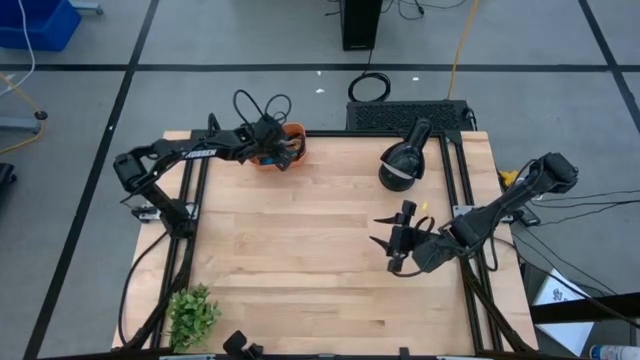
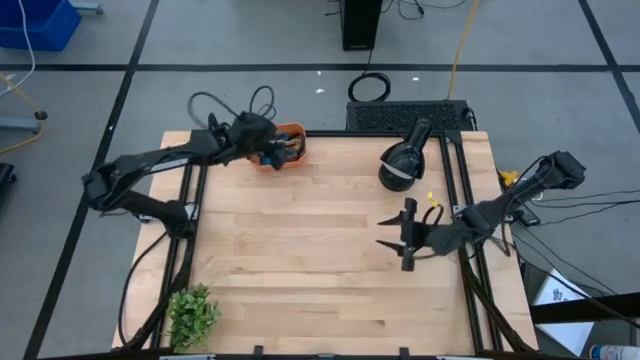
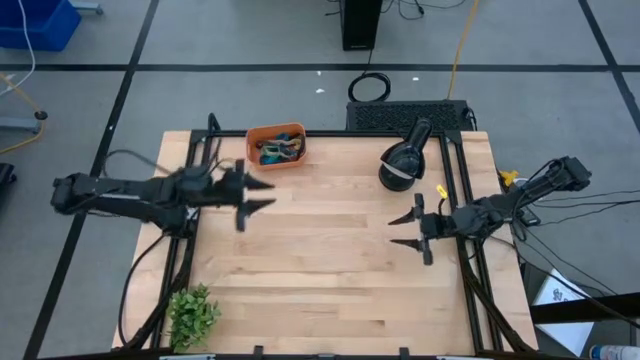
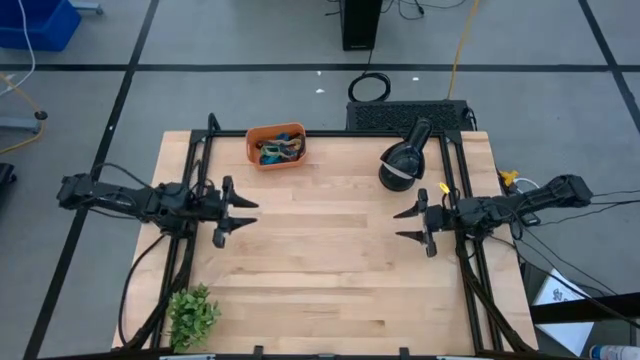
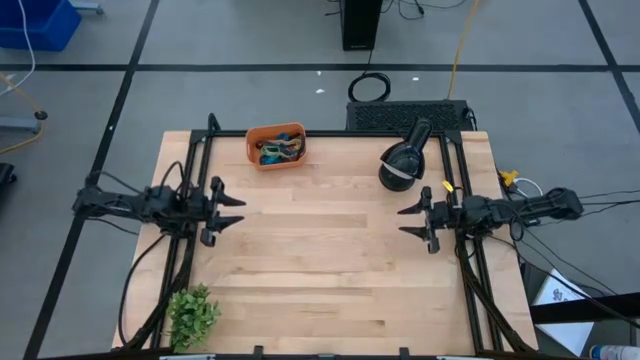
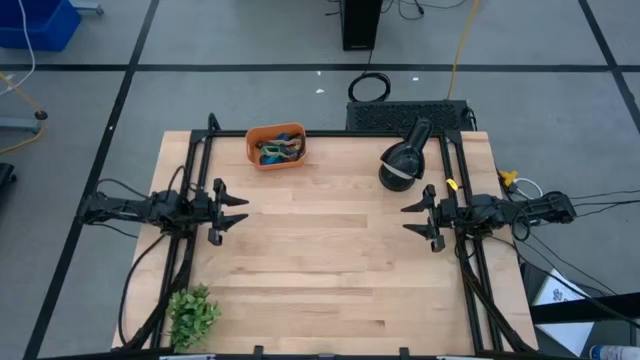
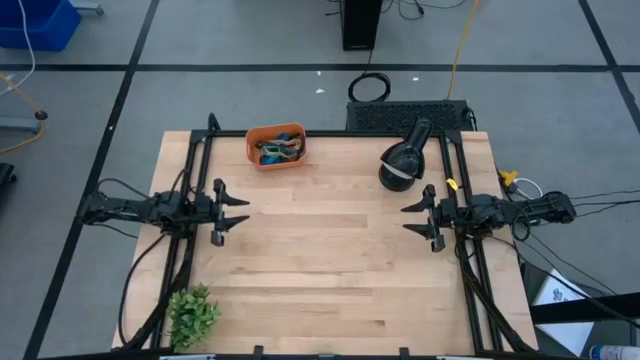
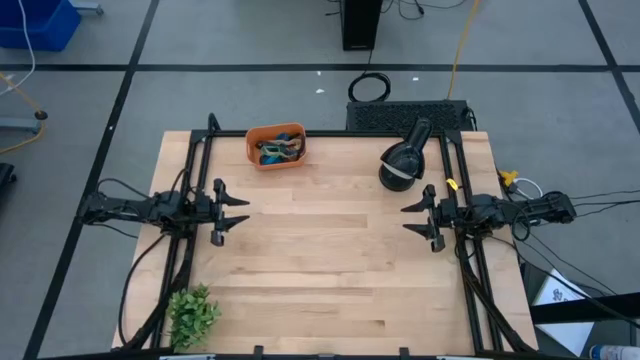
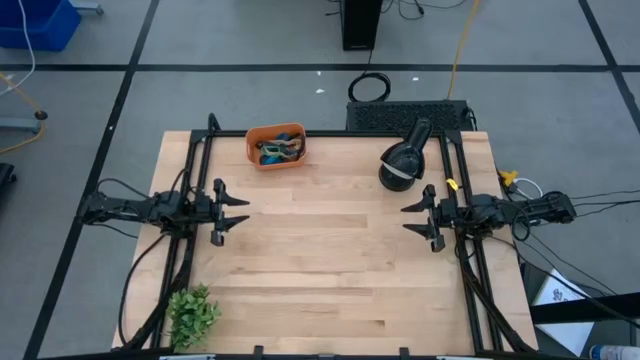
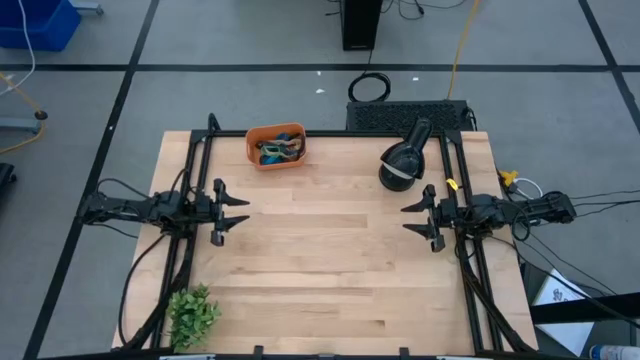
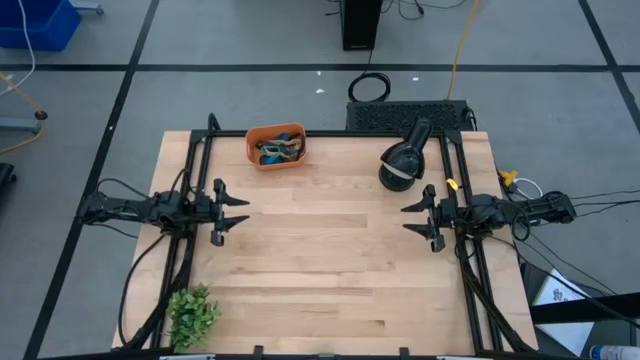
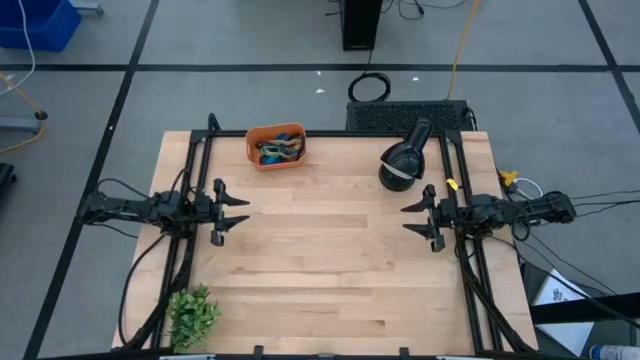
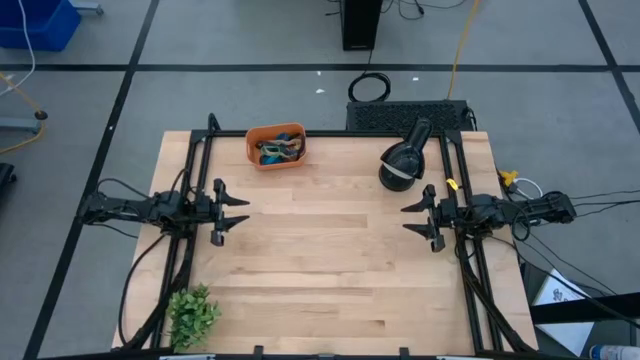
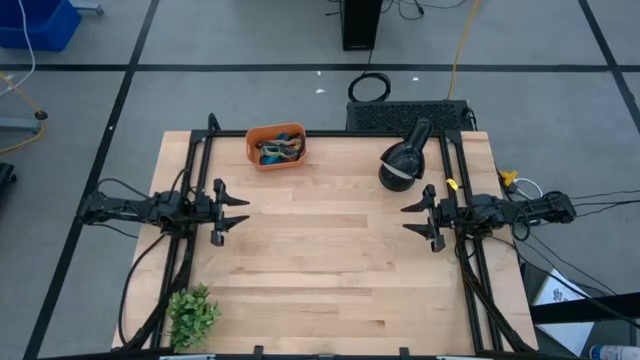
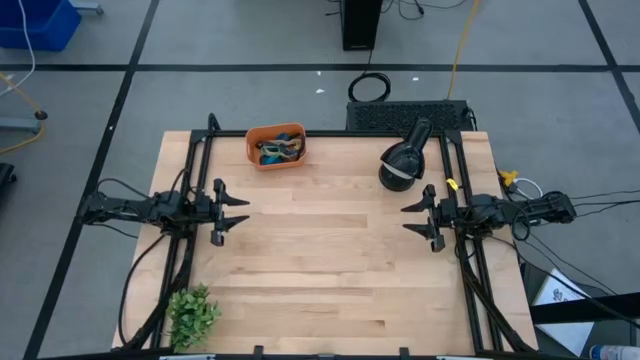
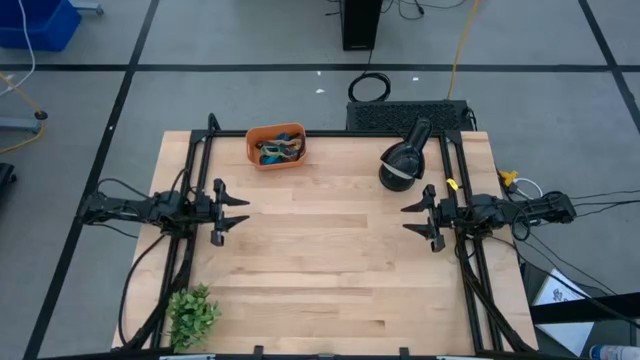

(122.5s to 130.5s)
Task: Pick and place rubber bands into bin
Return to Home Position

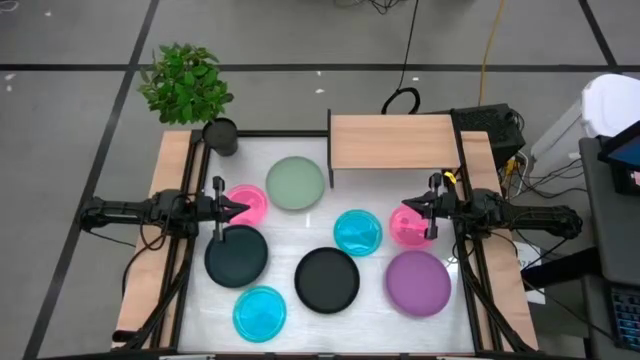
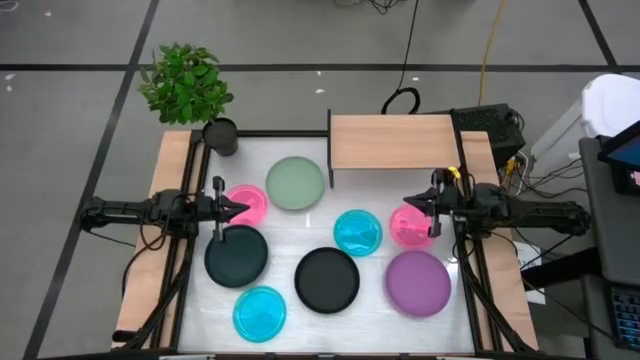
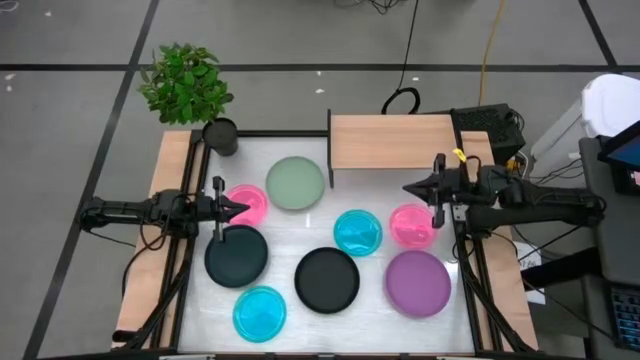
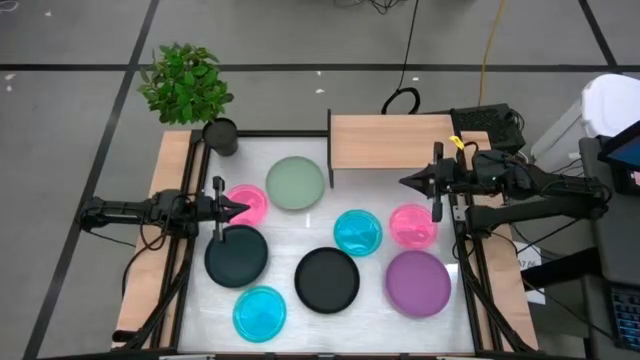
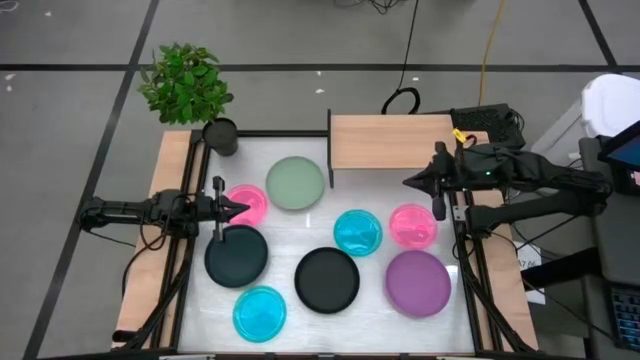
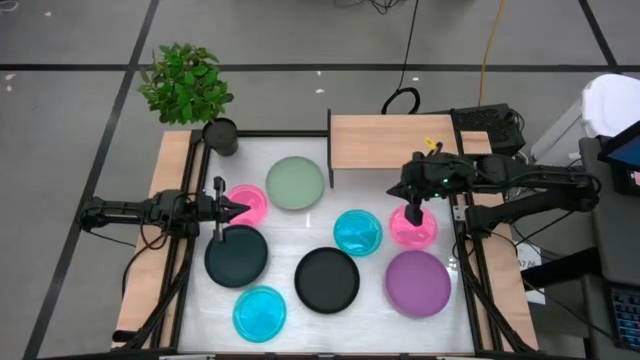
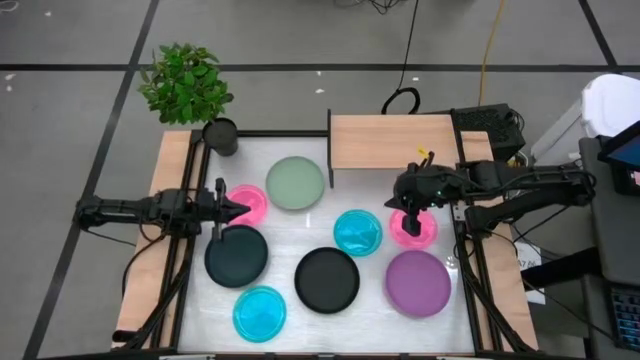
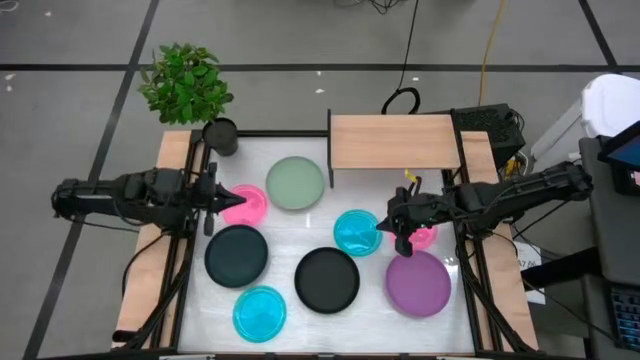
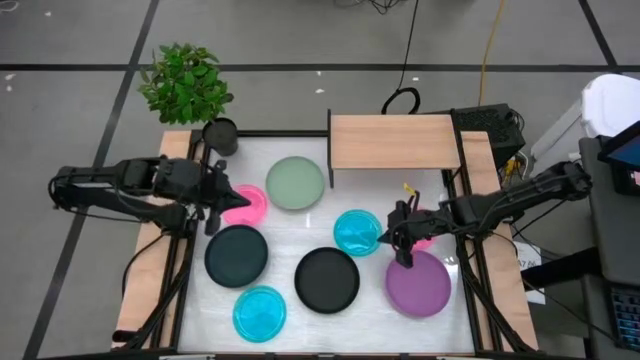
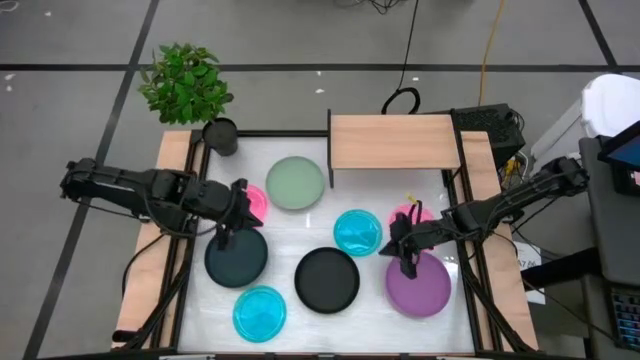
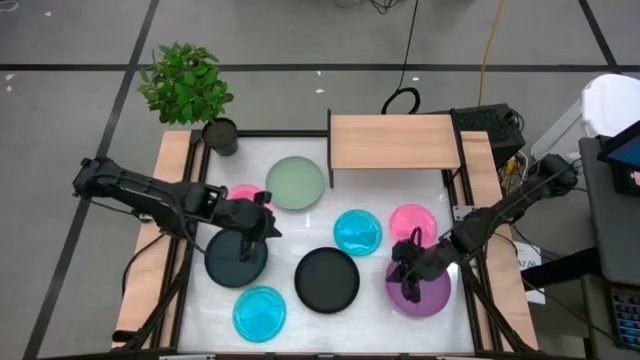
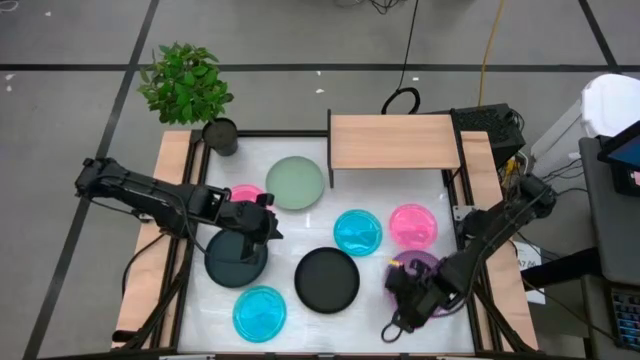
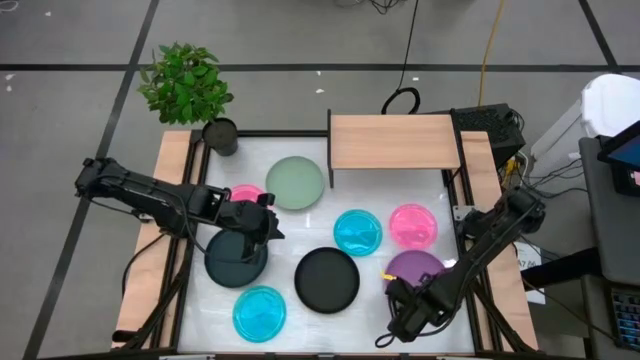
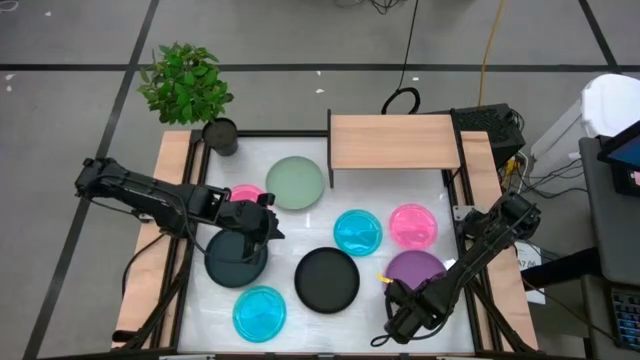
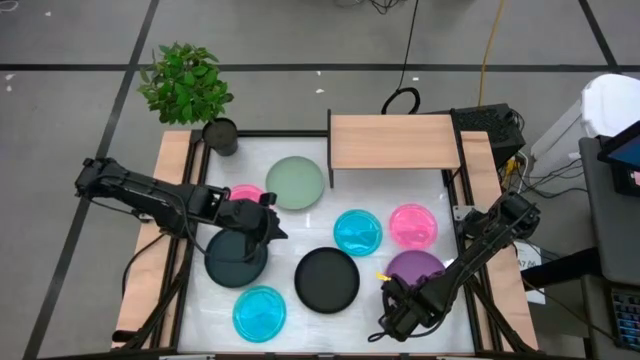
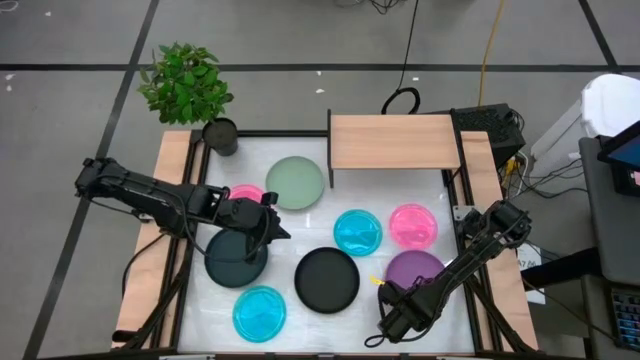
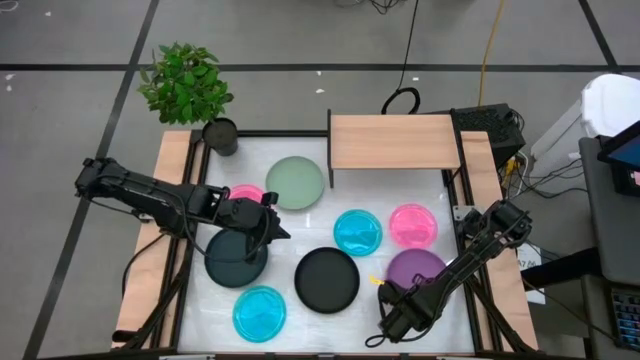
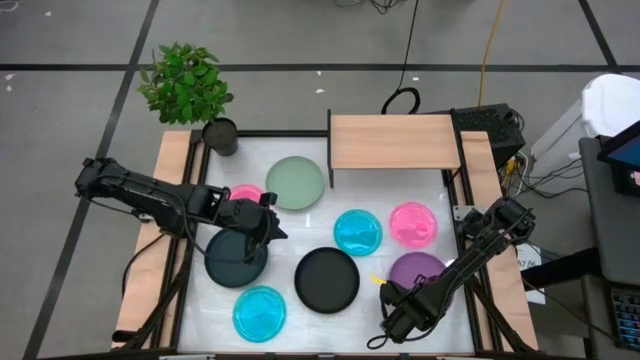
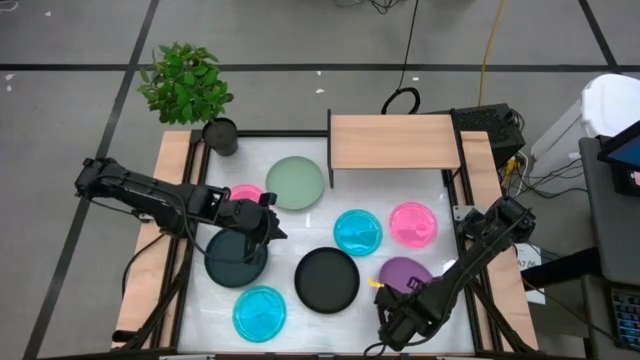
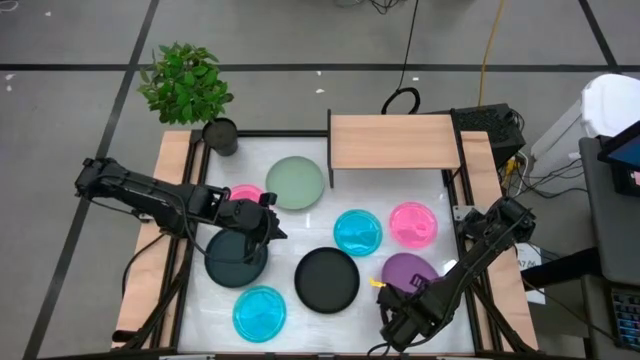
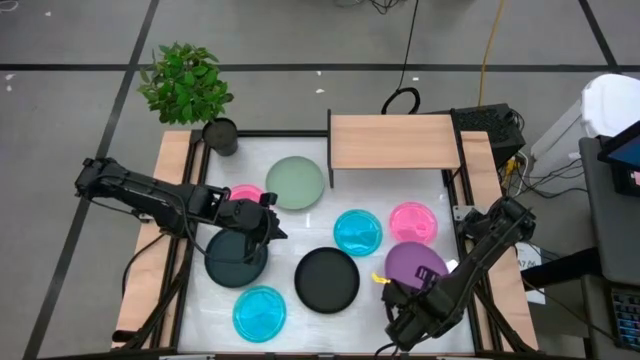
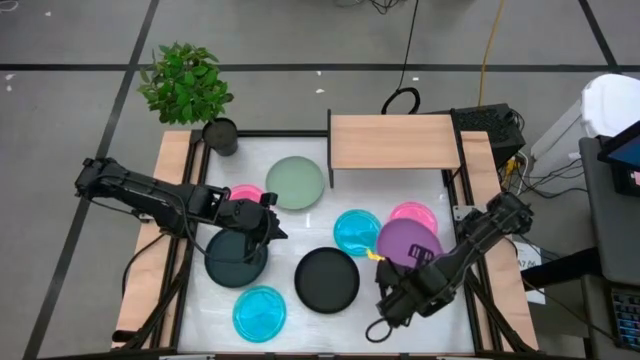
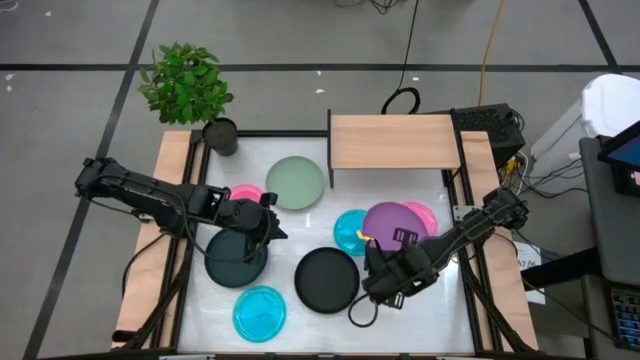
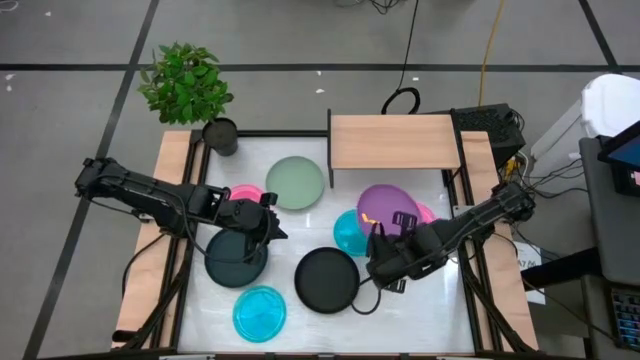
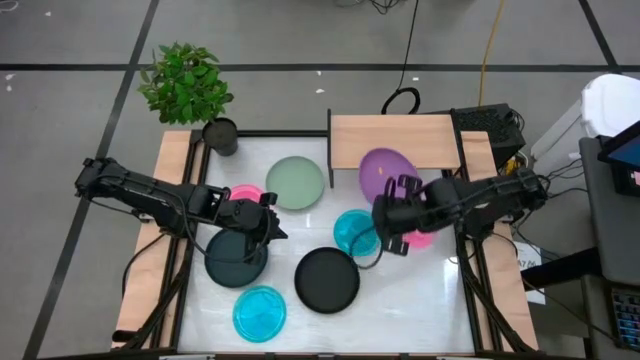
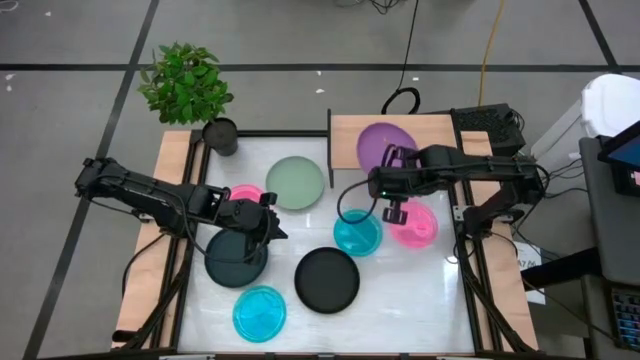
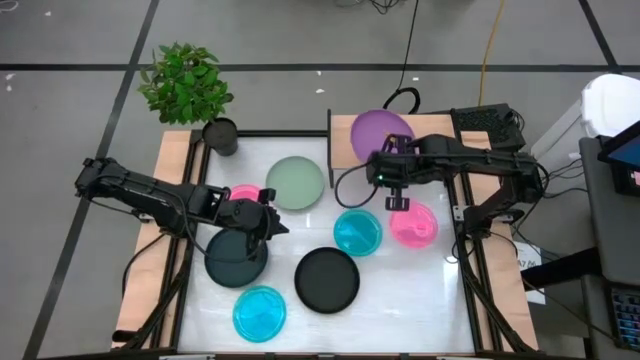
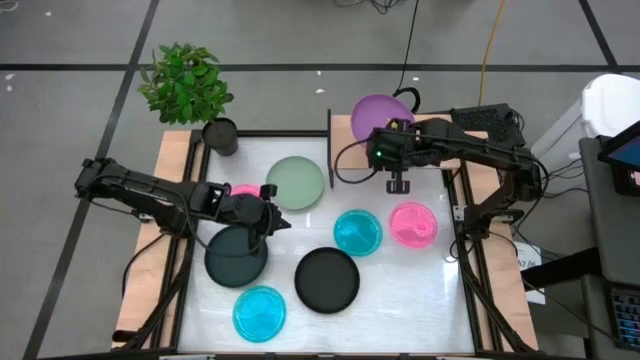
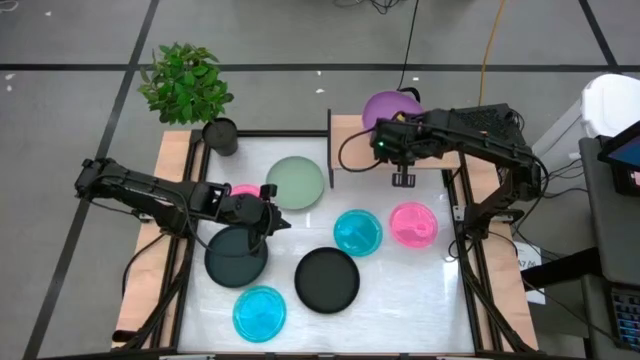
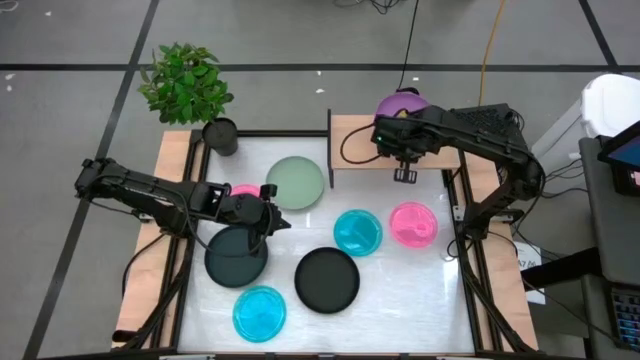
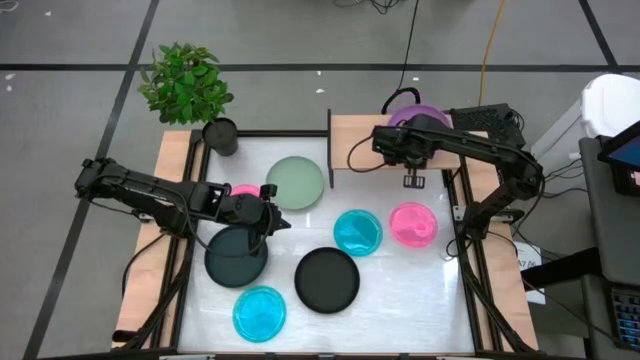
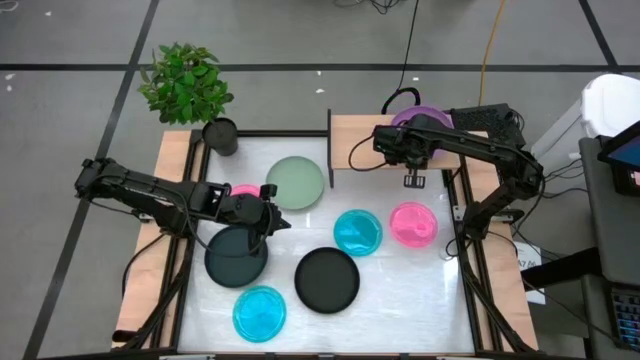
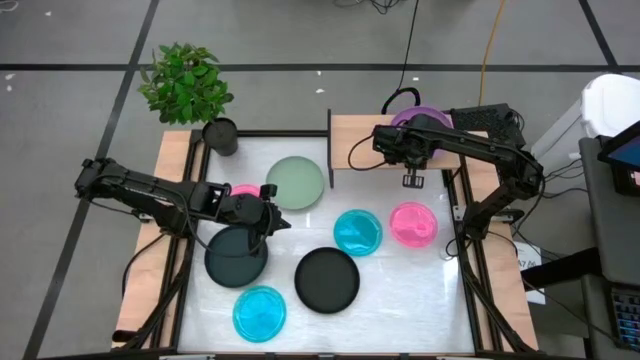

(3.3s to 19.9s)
Task: Place and stack plates onto a shelf
Put the violet plate on the shelf
